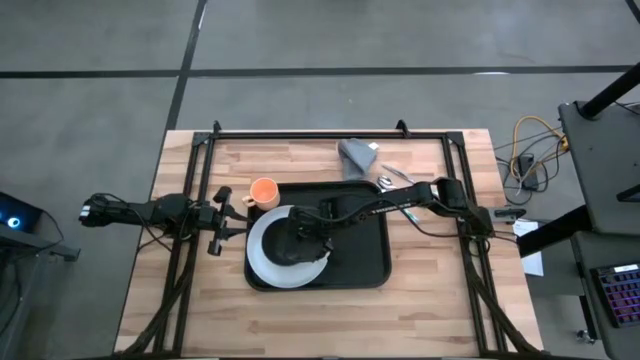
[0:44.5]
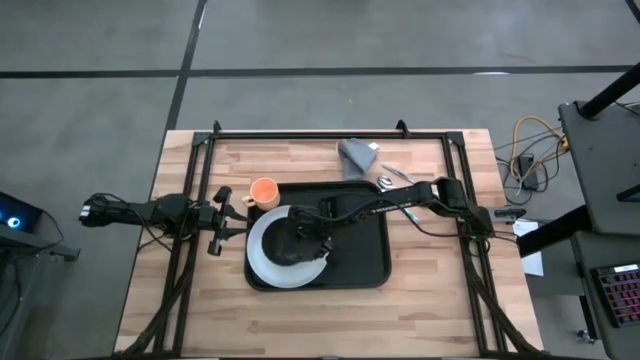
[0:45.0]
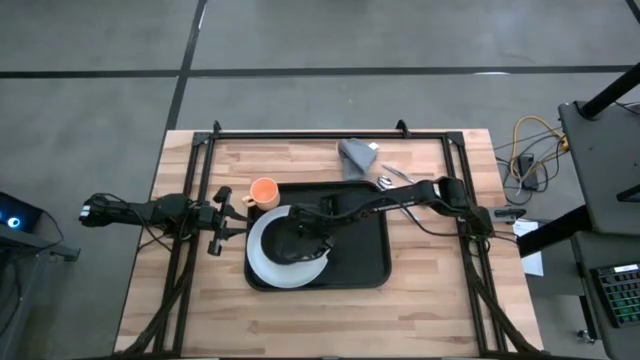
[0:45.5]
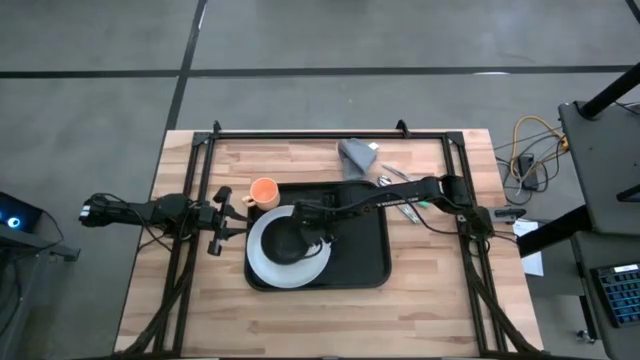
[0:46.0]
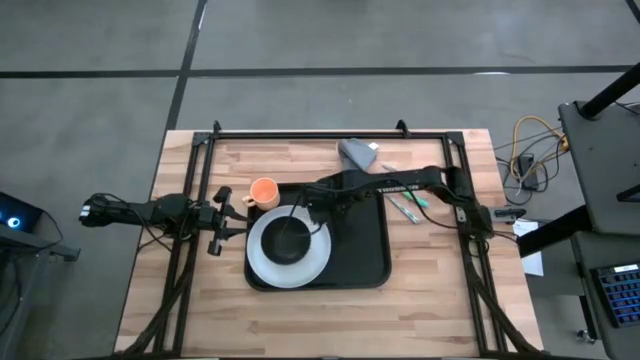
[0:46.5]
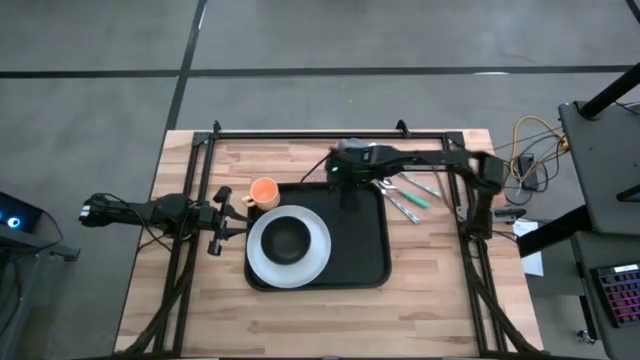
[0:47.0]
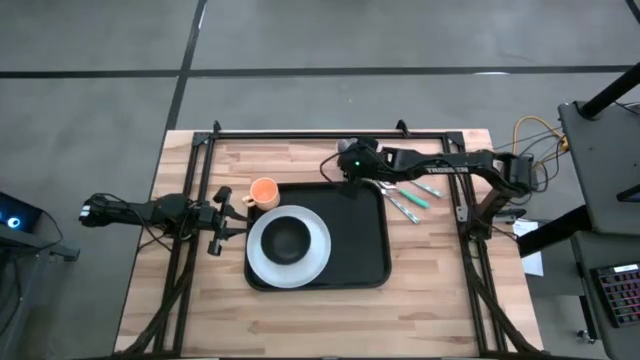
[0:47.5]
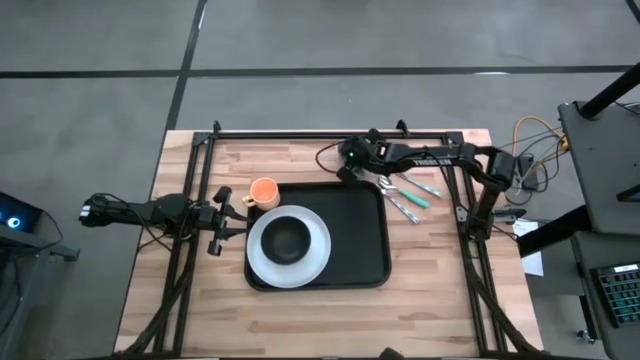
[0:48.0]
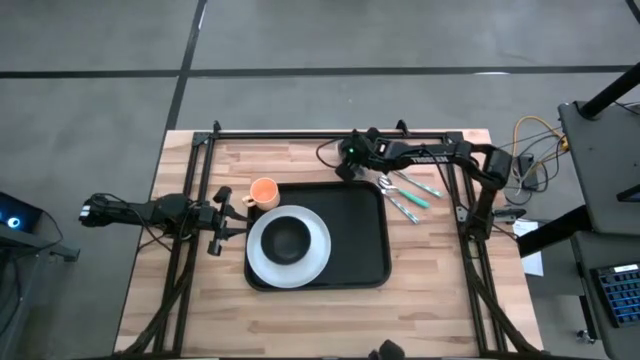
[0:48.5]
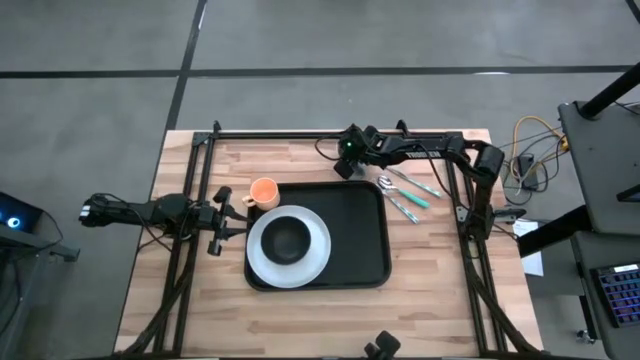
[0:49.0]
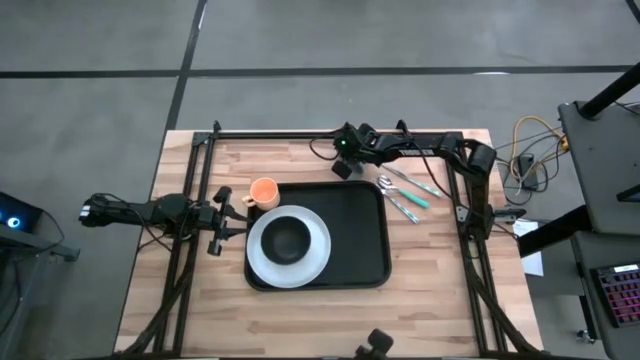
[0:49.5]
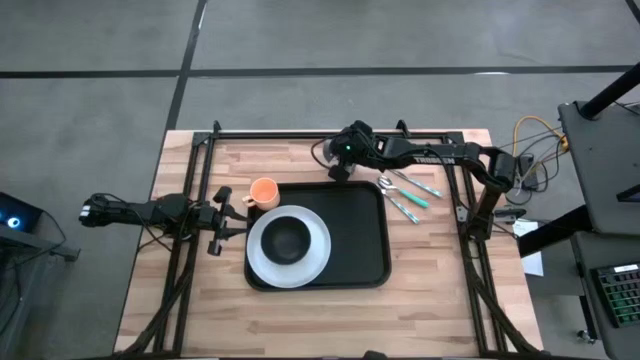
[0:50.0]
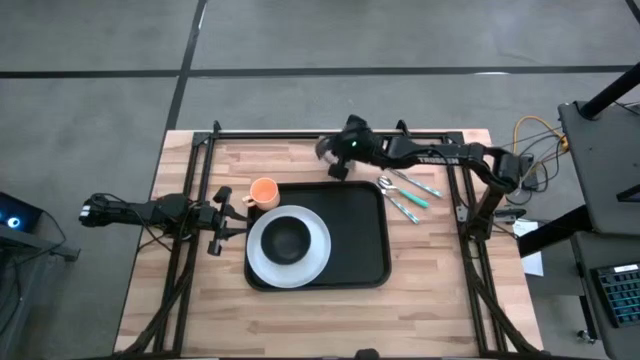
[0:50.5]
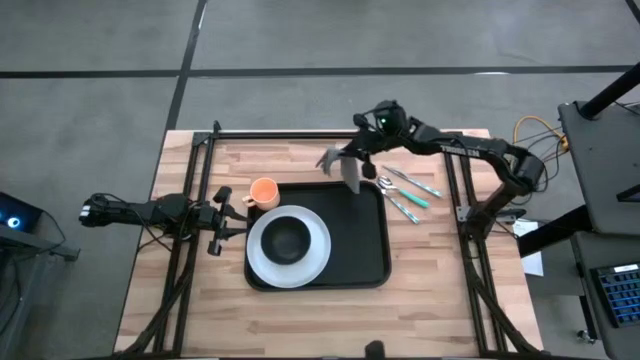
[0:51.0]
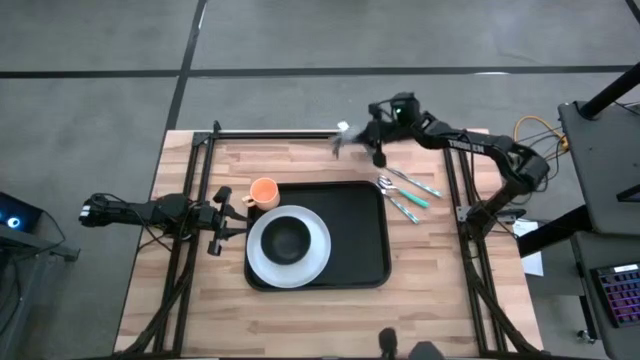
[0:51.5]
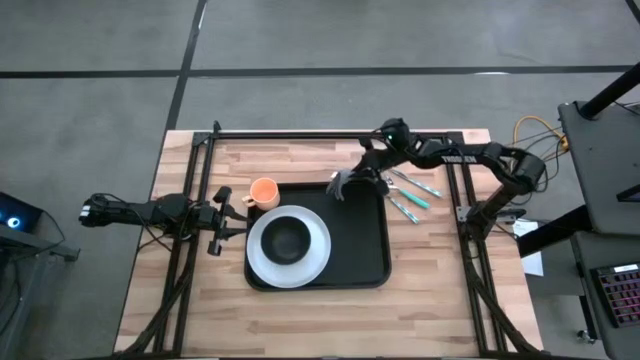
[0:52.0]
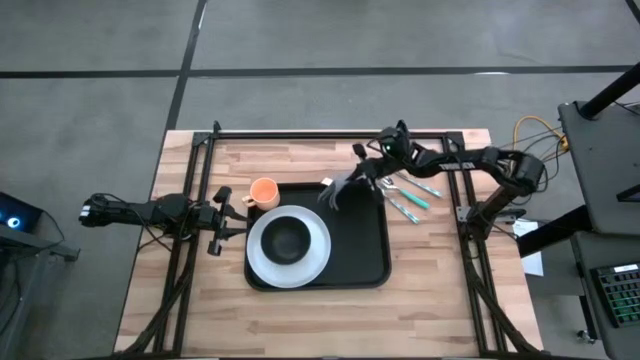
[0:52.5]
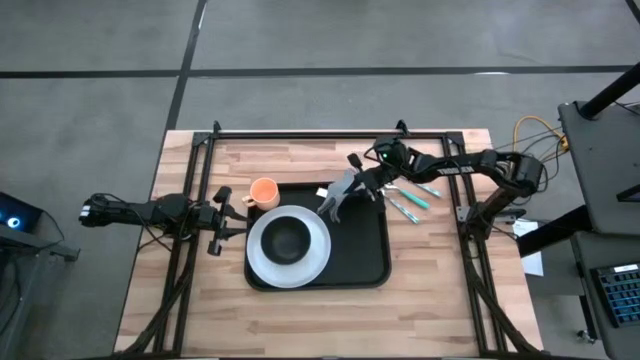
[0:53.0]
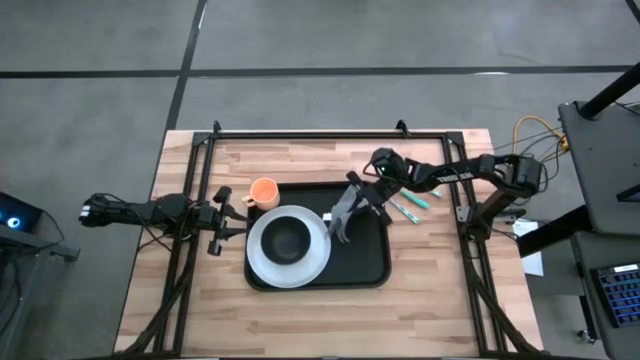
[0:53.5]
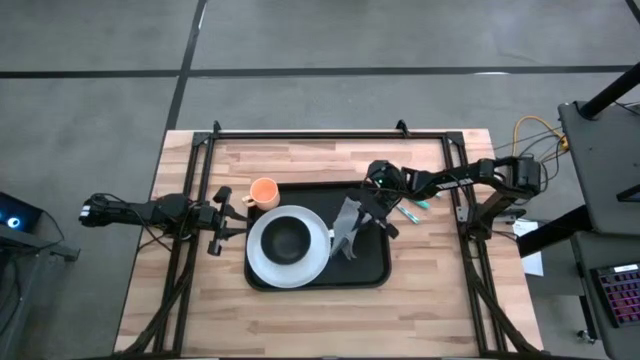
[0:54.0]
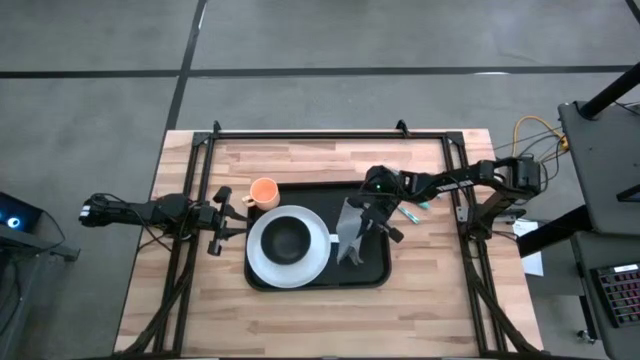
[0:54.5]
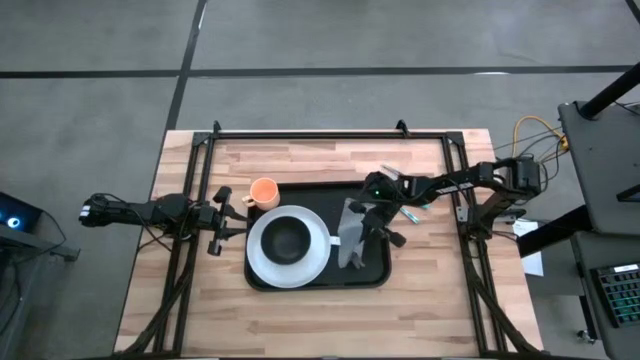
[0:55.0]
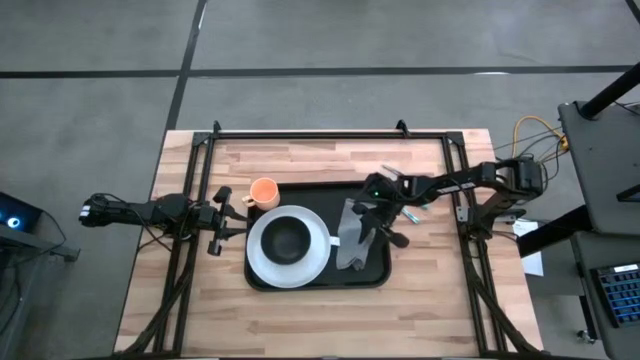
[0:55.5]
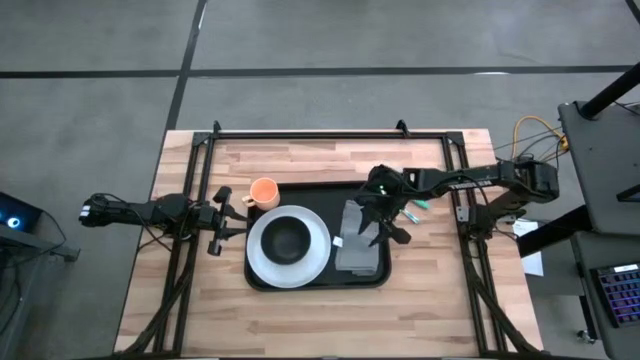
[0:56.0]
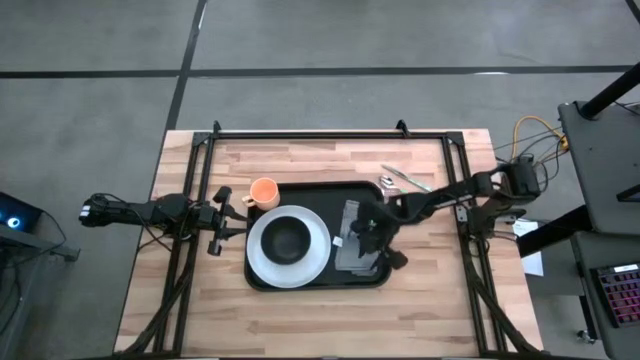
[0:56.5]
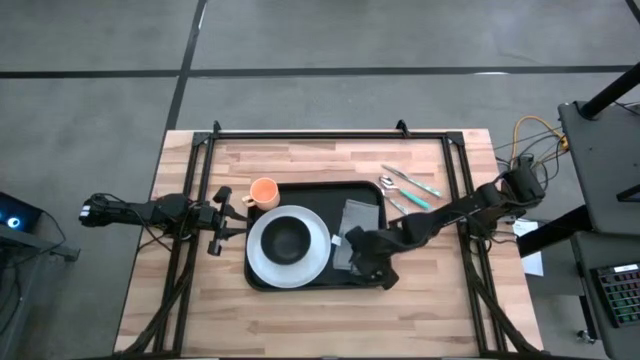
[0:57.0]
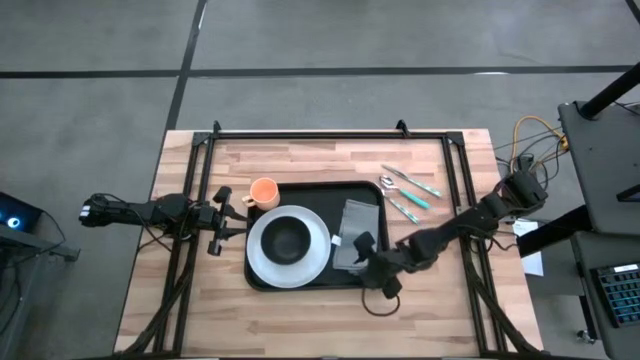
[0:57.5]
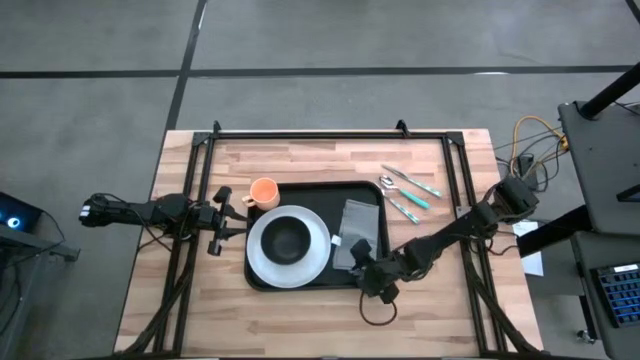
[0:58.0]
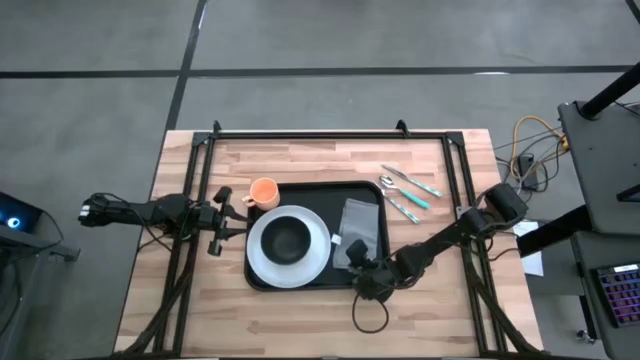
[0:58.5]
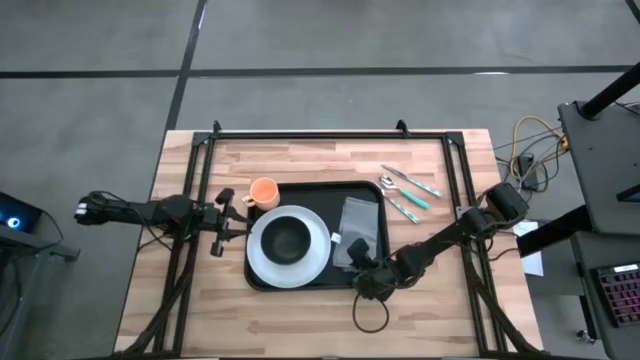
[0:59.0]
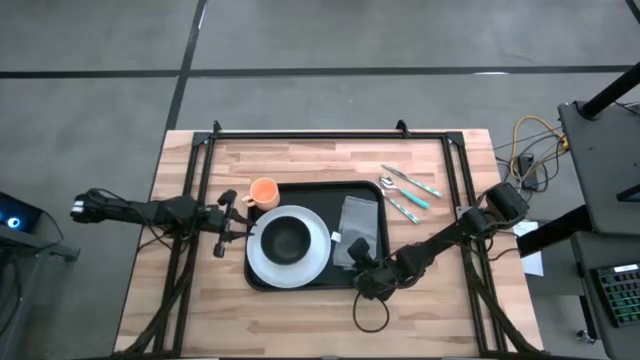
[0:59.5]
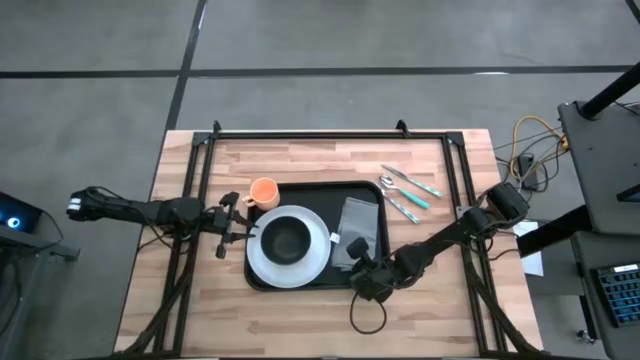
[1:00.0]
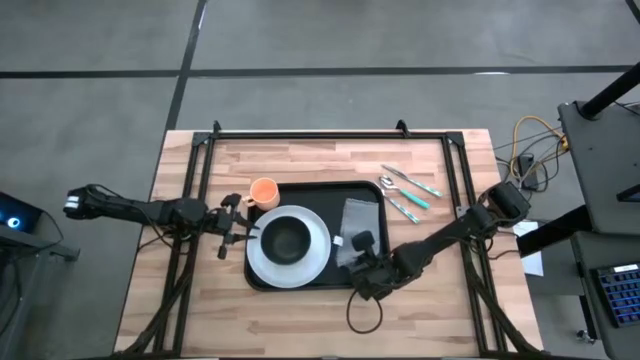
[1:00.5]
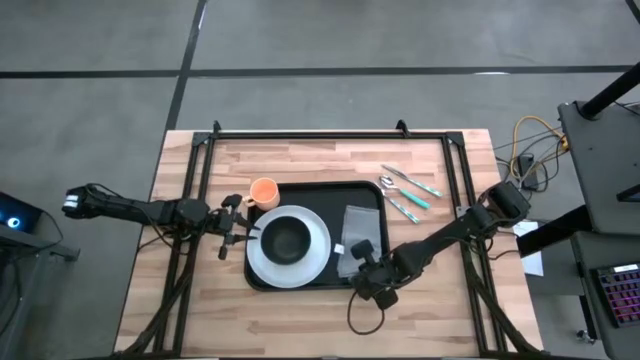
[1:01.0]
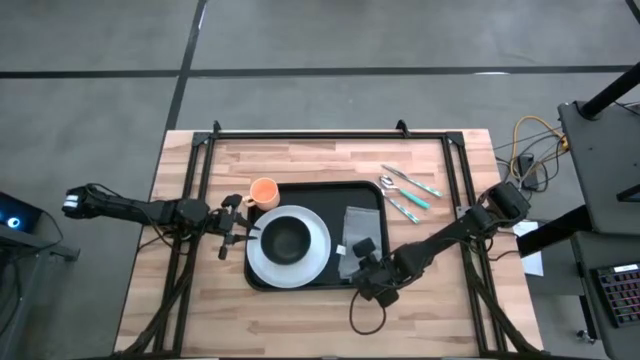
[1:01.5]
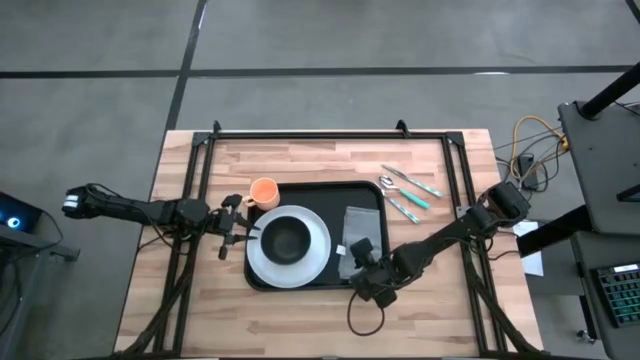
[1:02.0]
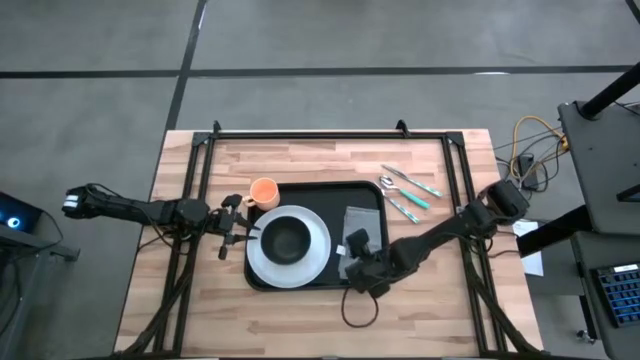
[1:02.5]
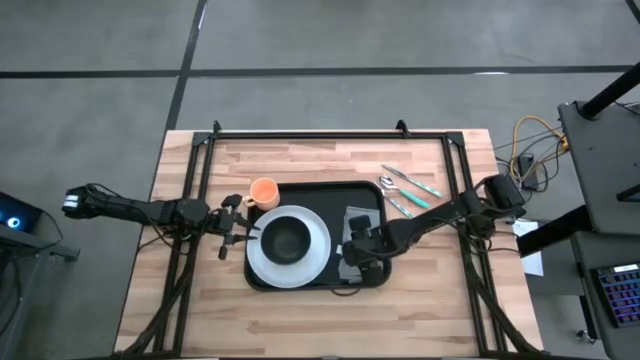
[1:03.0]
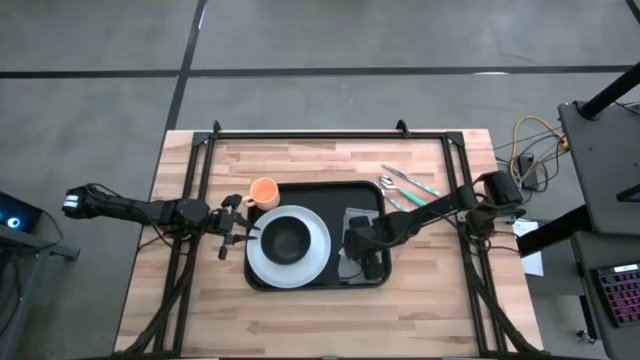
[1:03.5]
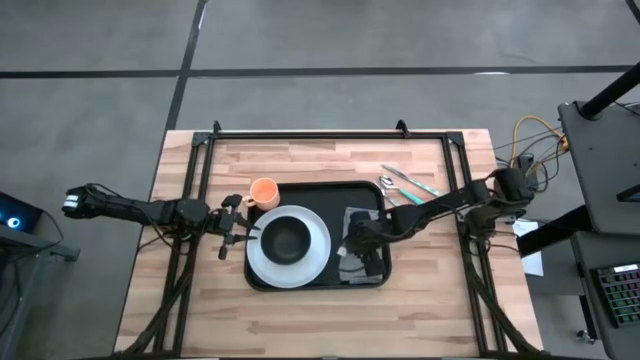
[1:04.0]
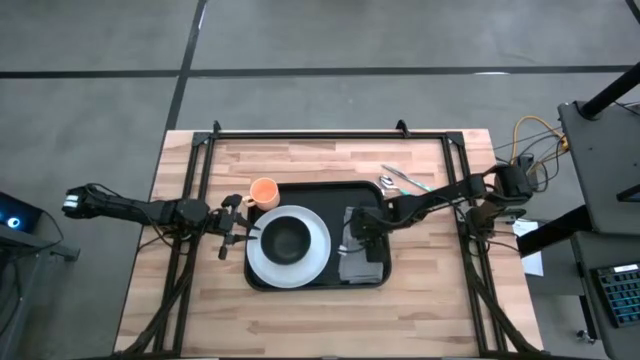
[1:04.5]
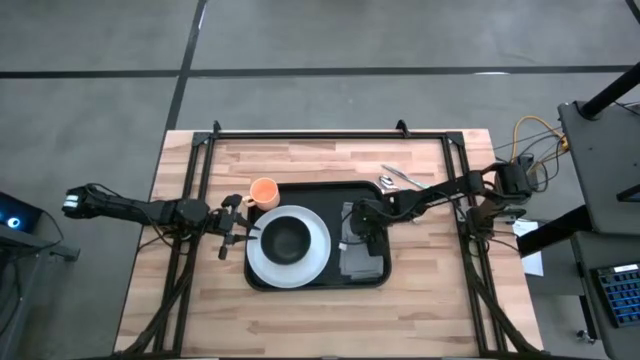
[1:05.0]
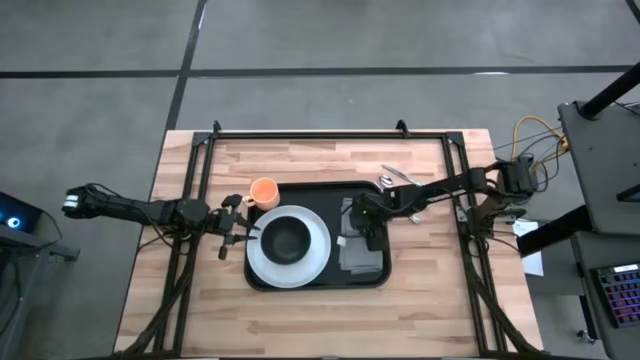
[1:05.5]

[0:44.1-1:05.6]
Task: Set up tray
Put the gray napkin on the black serving tray beside the white plate
